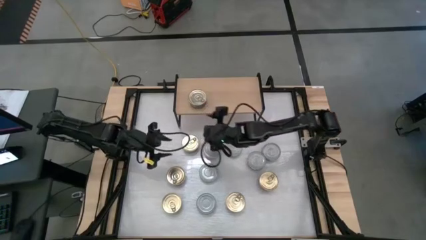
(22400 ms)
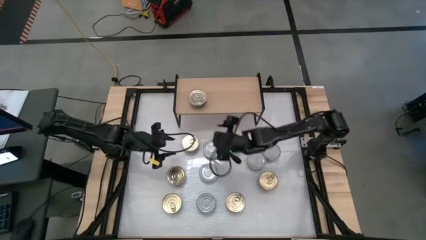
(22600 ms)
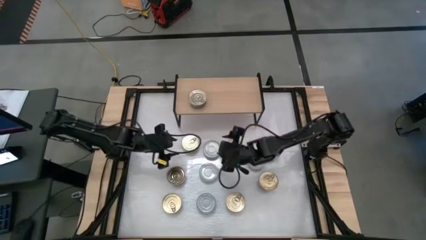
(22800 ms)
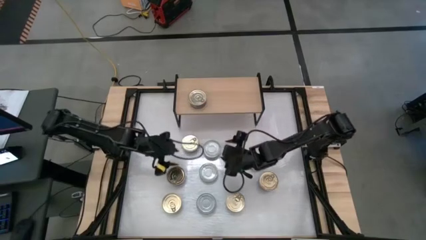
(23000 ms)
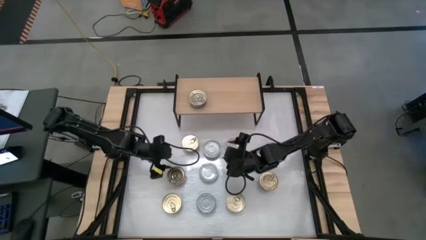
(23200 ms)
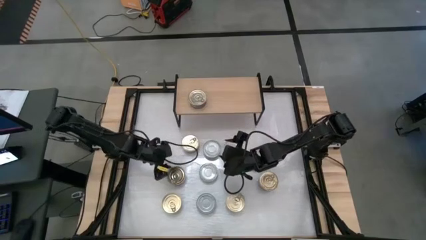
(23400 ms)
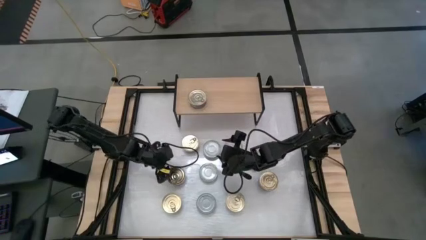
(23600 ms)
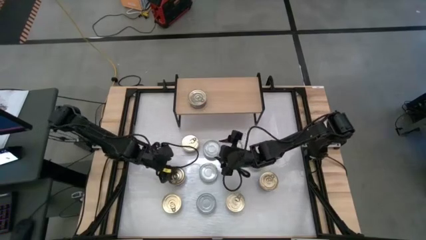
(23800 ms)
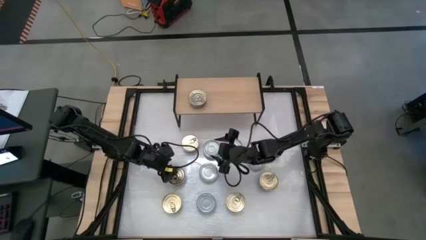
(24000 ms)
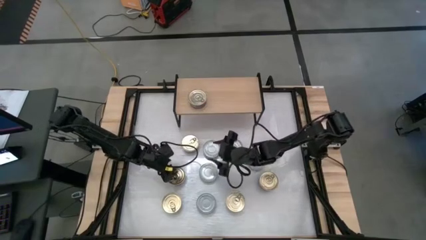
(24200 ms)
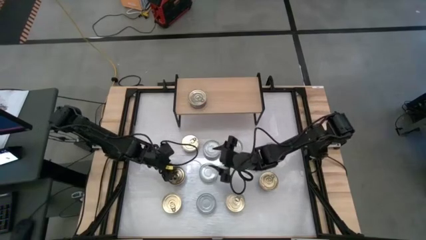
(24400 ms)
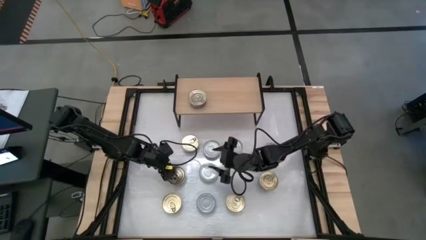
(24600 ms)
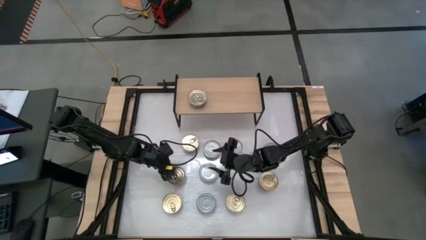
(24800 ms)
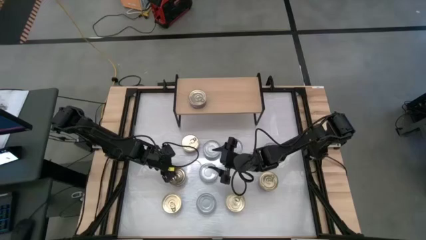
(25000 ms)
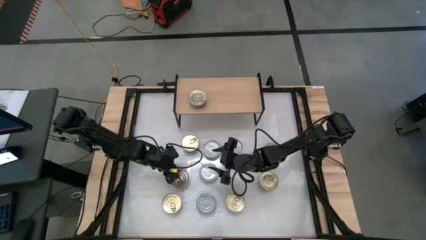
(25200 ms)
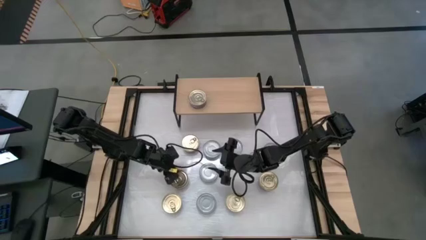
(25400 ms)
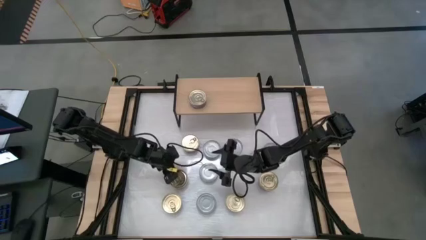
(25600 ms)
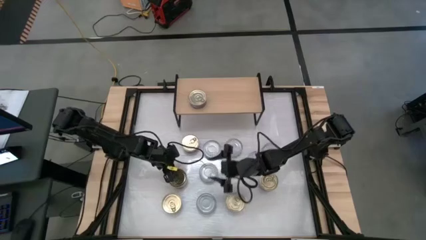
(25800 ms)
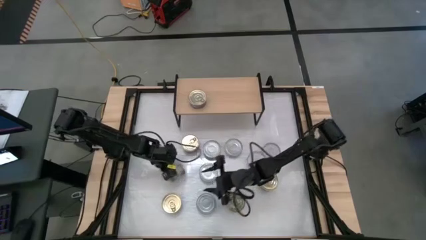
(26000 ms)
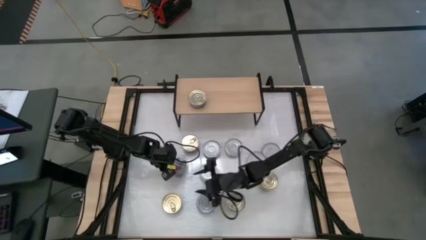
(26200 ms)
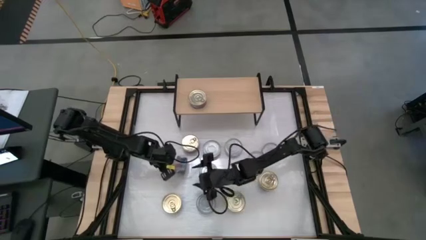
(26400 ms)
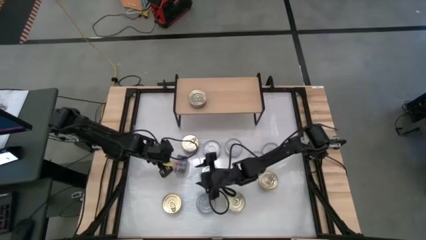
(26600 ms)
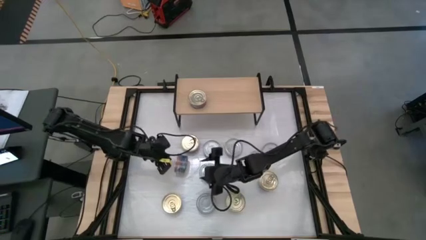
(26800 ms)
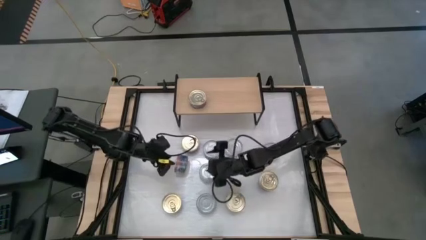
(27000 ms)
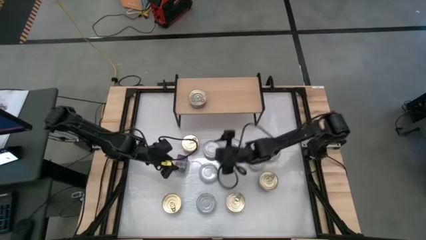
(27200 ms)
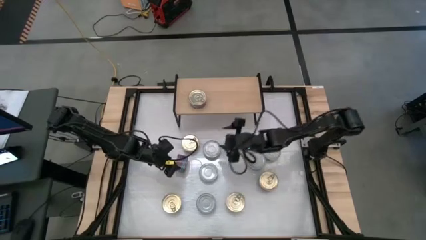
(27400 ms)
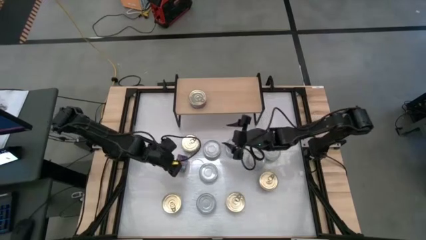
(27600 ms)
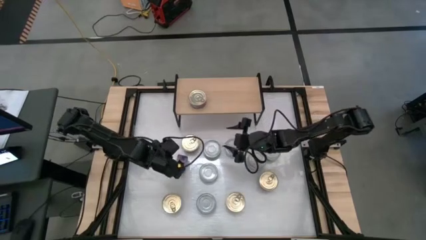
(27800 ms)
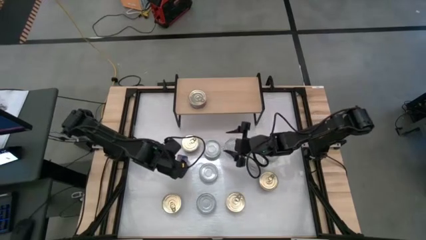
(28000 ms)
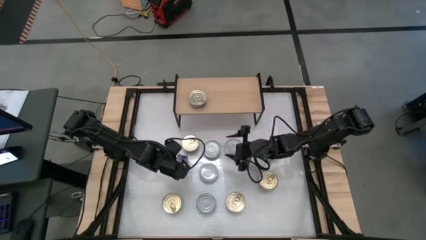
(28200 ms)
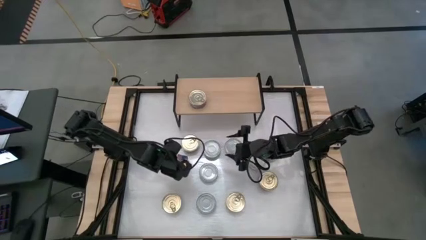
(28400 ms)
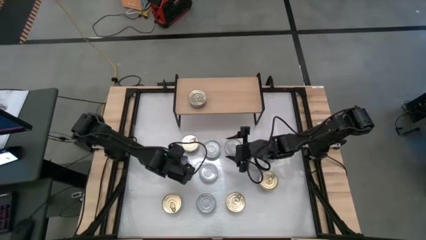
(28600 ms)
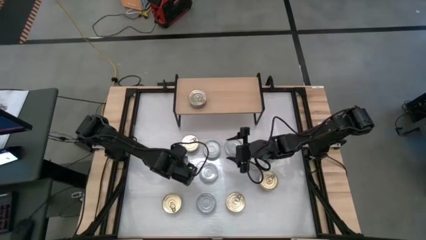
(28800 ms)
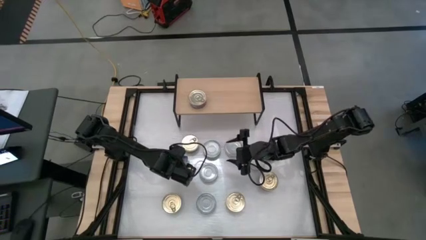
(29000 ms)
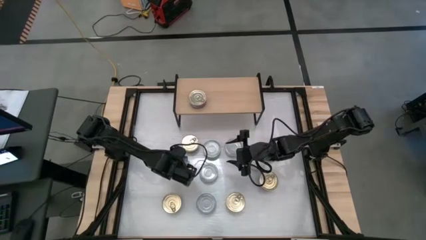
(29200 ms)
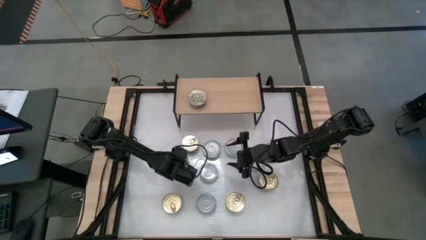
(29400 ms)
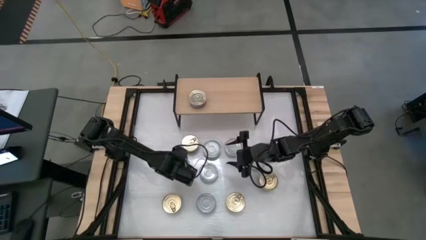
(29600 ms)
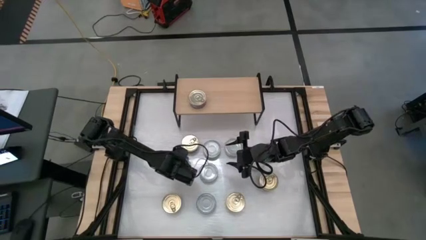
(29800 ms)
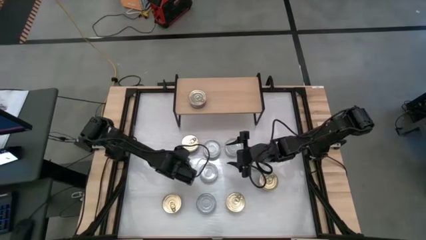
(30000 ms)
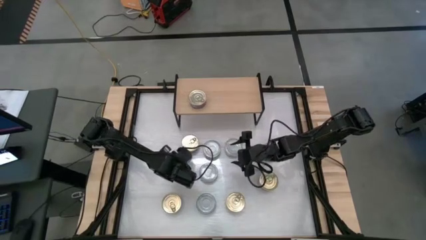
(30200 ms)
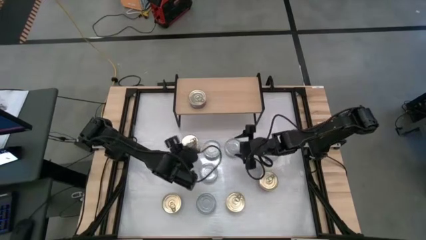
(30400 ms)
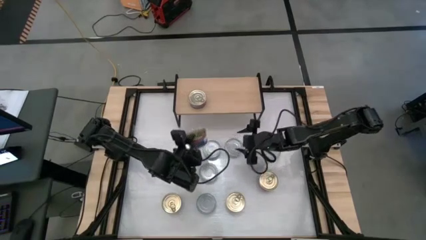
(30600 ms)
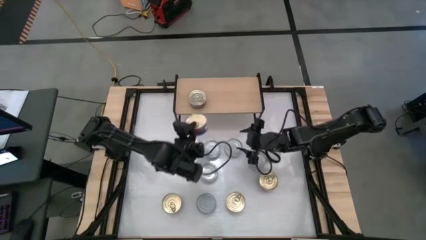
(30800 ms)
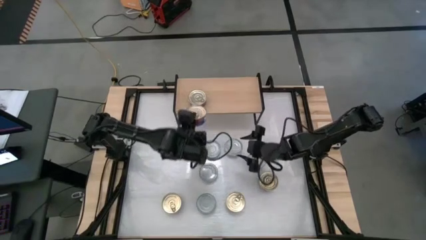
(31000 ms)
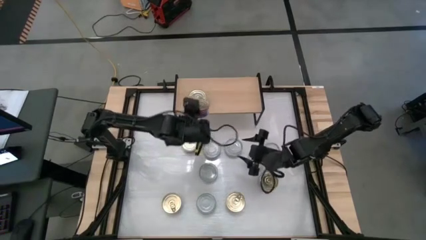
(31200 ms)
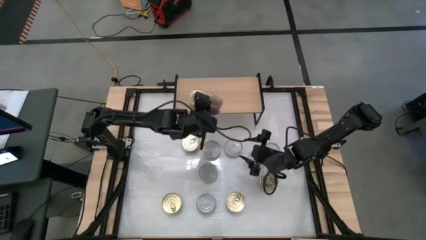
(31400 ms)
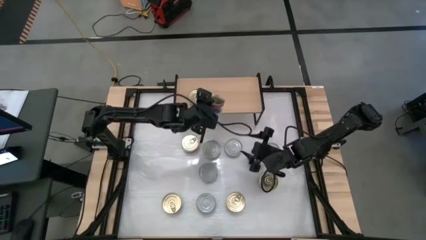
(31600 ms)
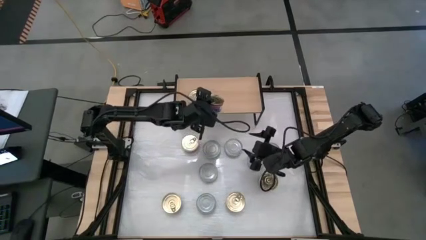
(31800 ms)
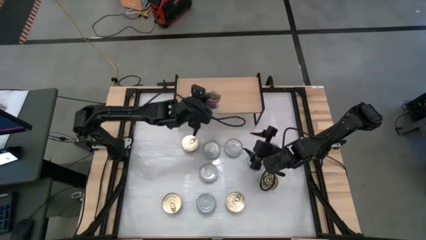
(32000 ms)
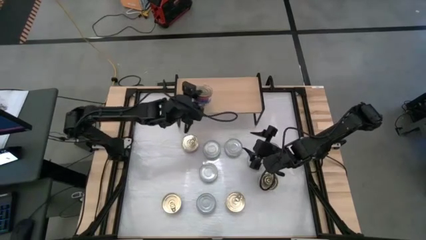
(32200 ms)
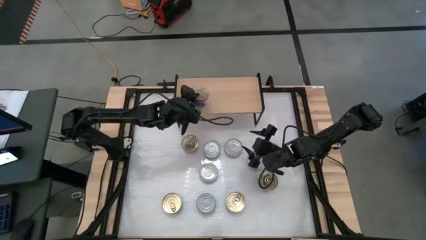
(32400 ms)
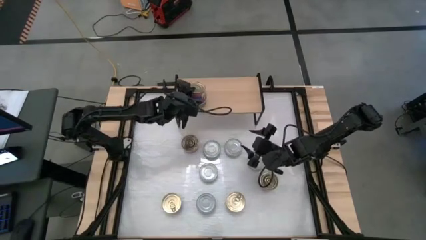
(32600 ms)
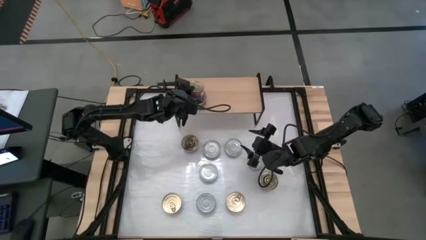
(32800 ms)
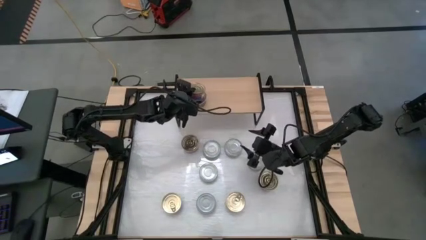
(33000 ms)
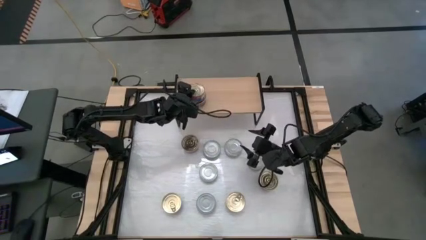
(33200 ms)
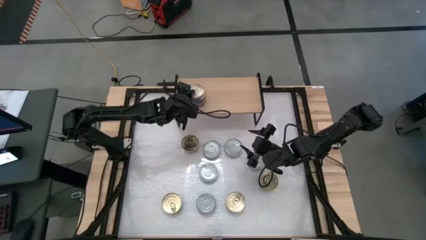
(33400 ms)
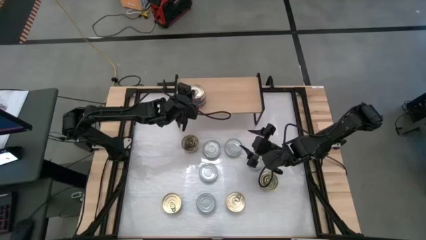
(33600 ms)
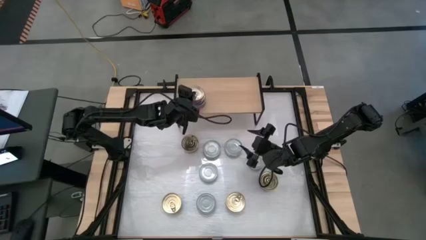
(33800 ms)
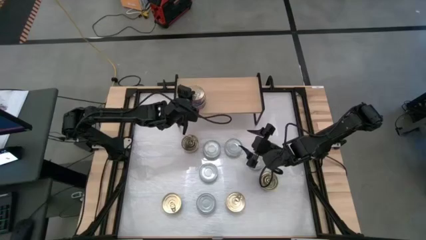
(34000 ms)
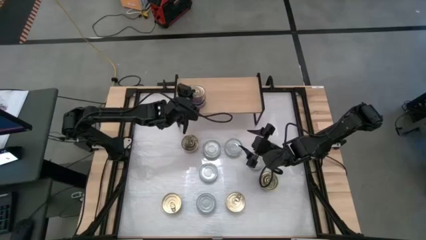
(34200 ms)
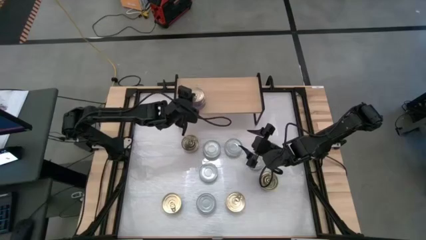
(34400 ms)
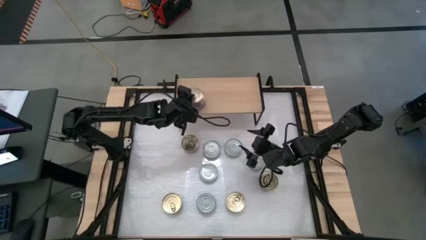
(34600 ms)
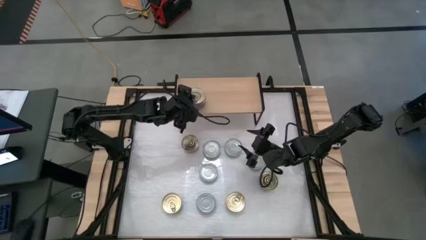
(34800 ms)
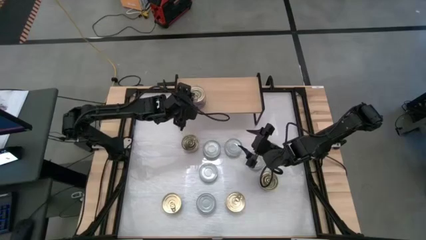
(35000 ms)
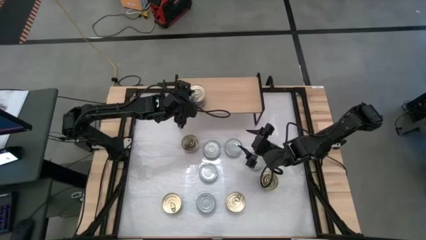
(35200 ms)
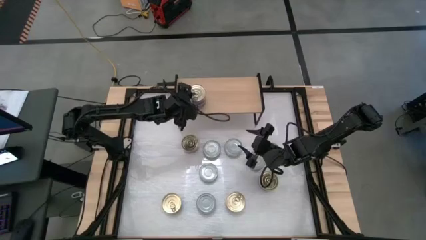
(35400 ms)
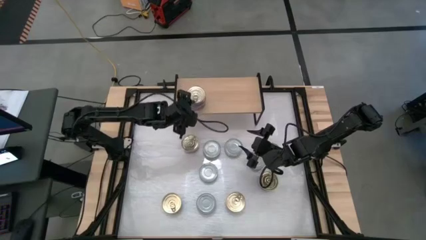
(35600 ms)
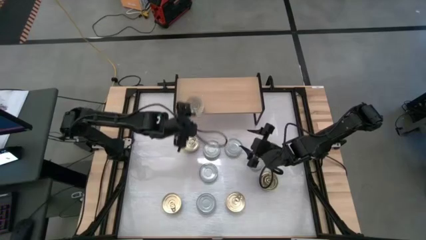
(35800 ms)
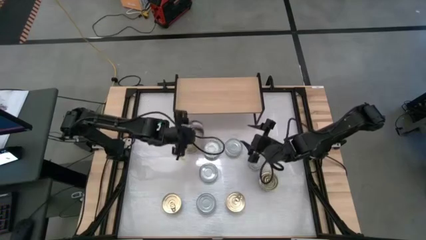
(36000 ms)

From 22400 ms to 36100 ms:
Task: Stack canned seafood by type on shelf
Stack the blue tuna can on top of the other blue tuna can on the shelf

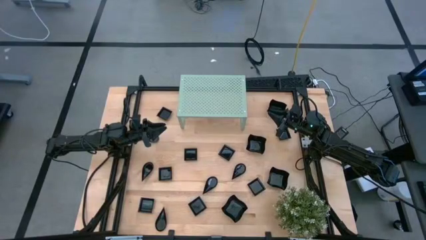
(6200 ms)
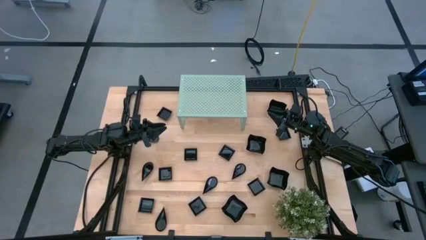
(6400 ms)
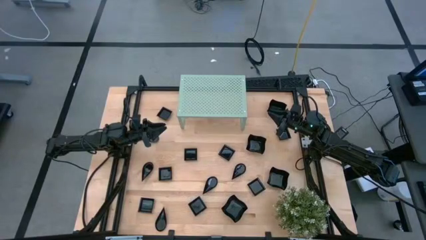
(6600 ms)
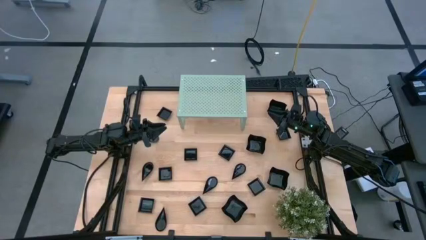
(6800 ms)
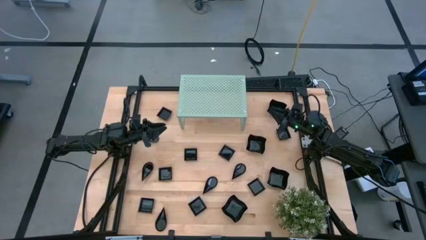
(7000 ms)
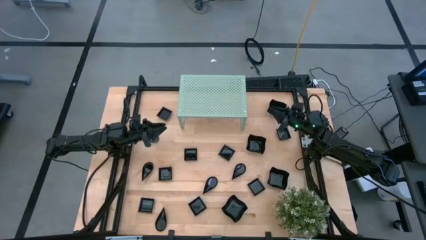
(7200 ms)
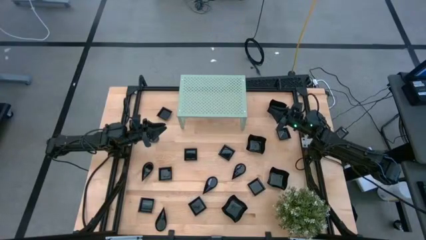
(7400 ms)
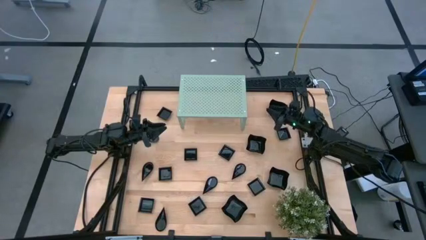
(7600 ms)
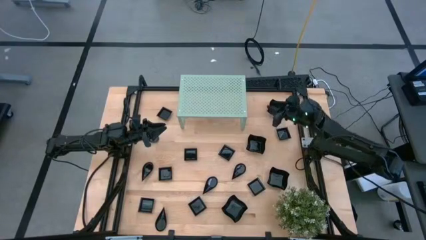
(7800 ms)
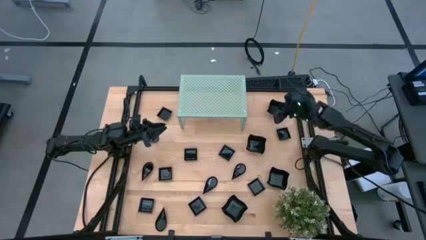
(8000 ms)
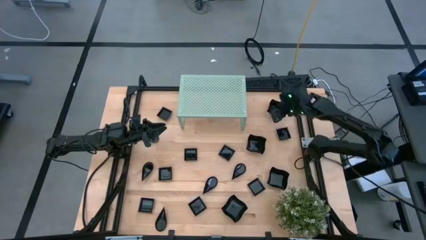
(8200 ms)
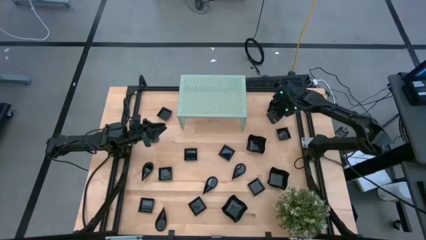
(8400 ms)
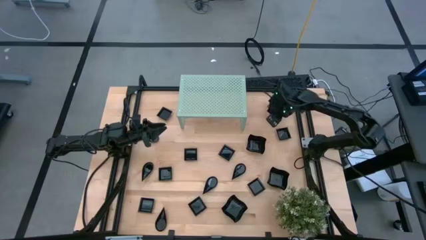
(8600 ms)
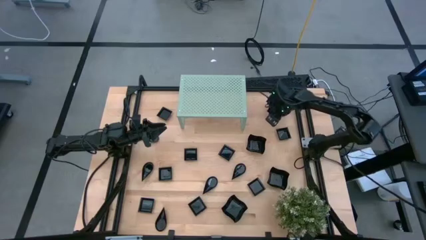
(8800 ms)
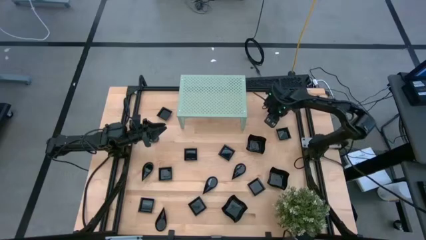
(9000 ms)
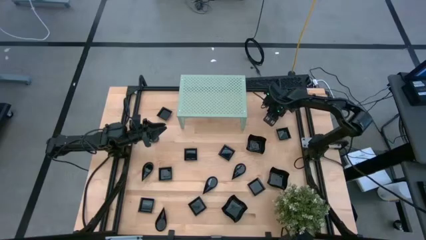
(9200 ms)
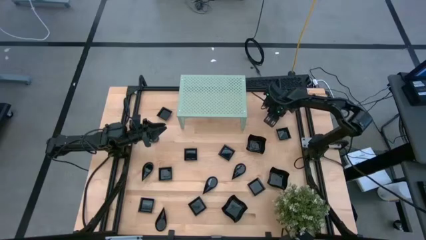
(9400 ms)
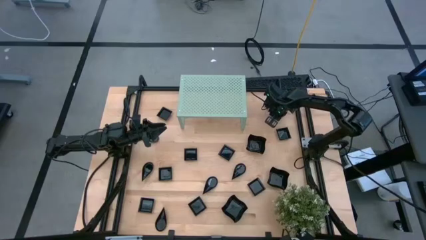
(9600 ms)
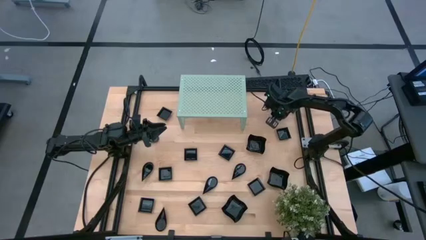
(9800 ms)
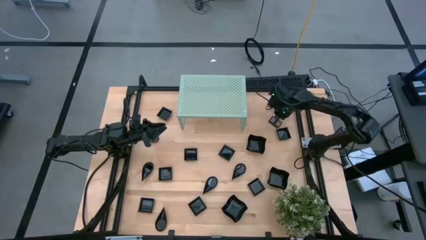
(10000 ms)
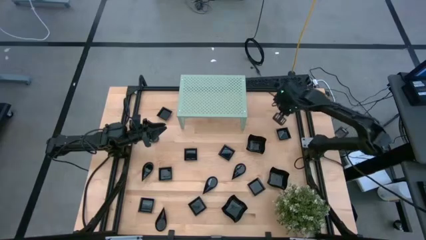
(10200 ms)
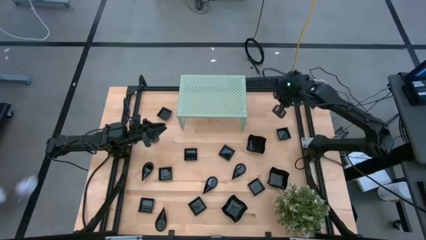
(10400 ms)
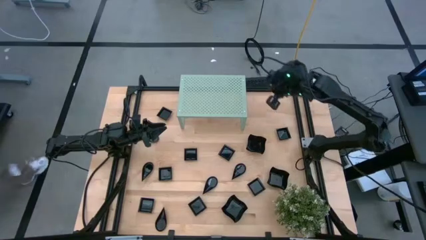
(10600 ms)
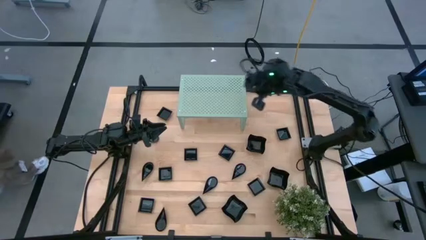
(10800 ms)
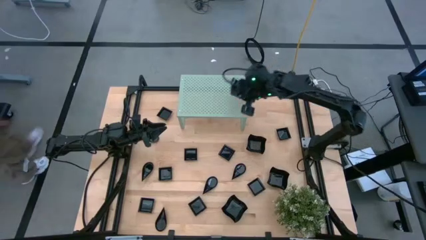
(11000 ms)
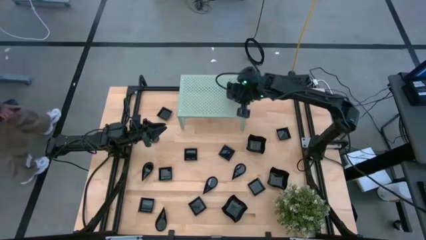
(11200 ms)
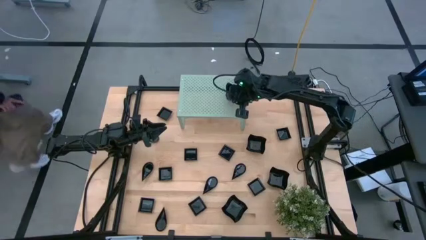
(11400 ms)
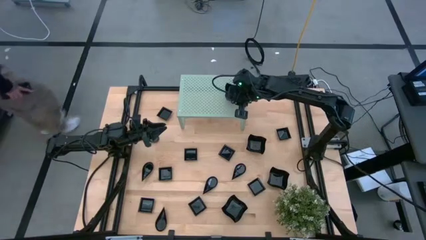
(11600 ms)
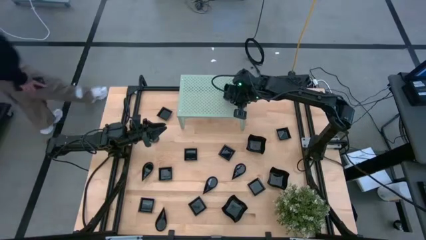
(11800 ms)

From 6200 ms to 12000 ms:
Task: Pick & Place Mini shaped plates
Put the black distorted square plate on the shelf
